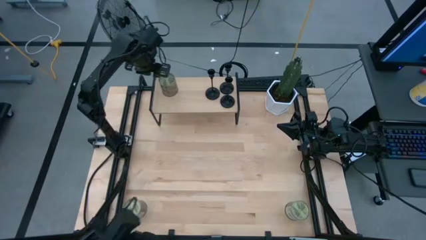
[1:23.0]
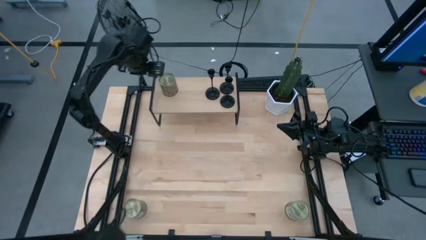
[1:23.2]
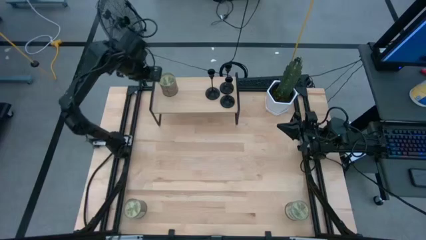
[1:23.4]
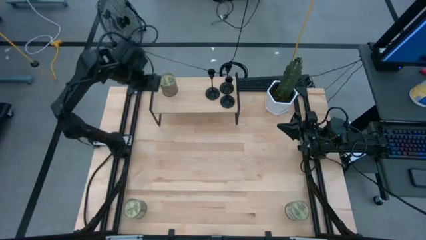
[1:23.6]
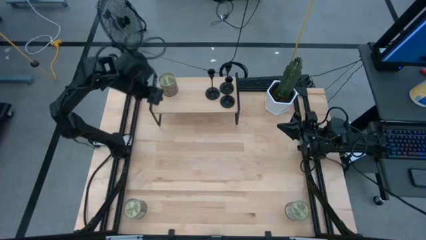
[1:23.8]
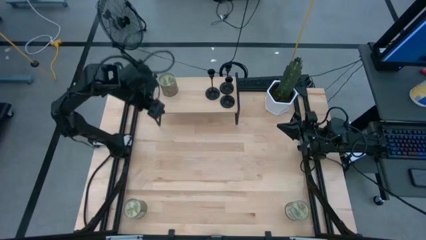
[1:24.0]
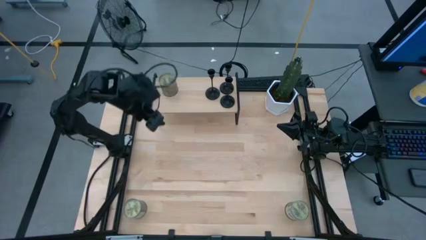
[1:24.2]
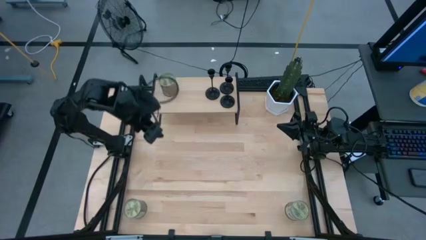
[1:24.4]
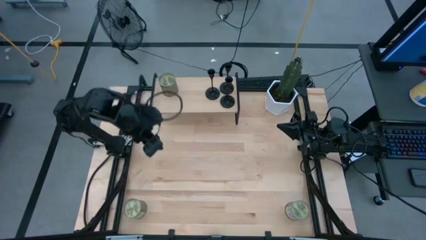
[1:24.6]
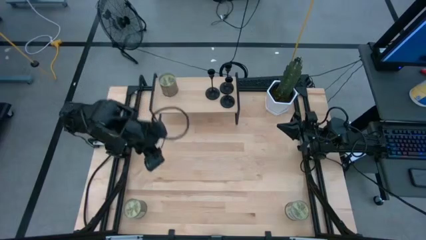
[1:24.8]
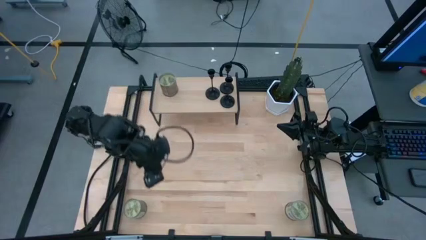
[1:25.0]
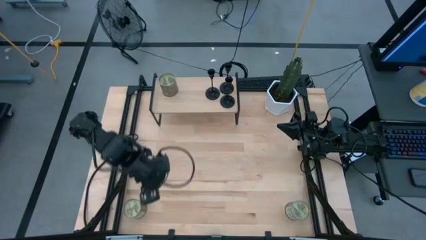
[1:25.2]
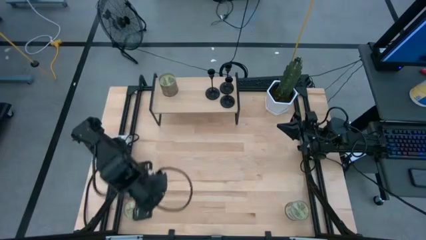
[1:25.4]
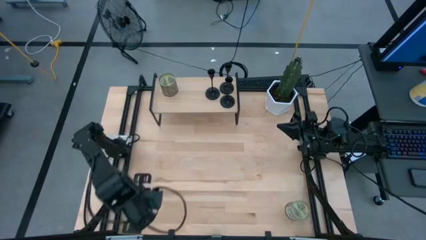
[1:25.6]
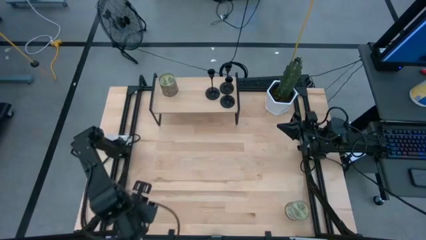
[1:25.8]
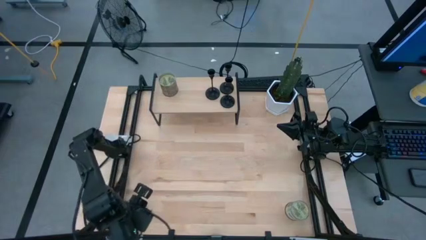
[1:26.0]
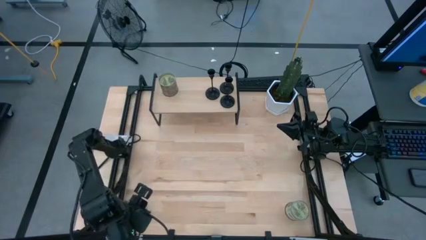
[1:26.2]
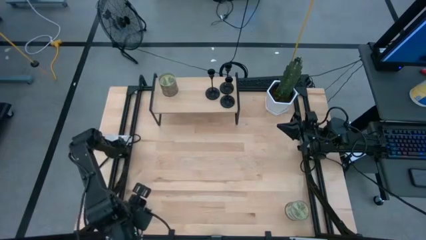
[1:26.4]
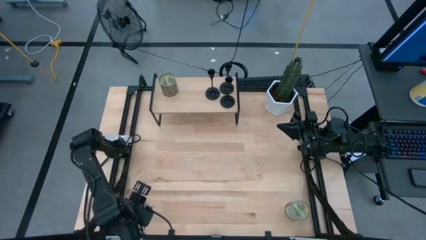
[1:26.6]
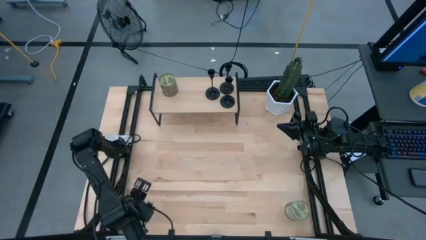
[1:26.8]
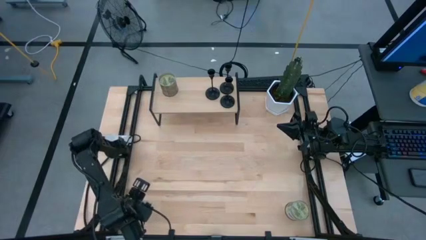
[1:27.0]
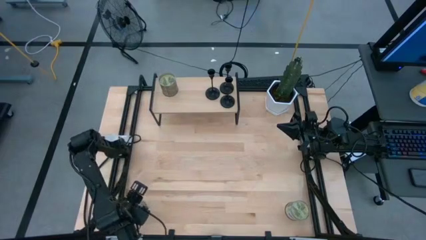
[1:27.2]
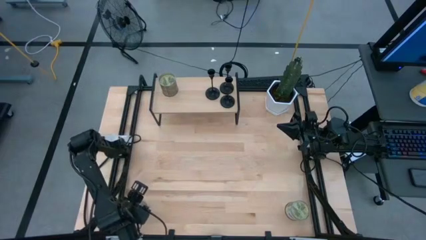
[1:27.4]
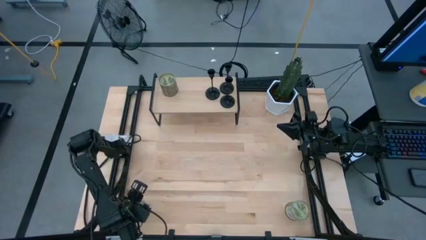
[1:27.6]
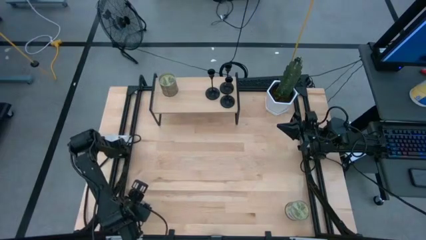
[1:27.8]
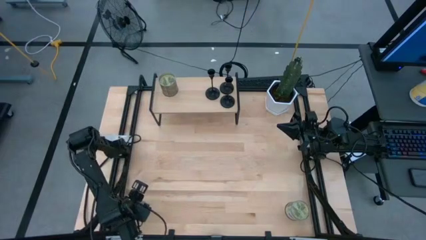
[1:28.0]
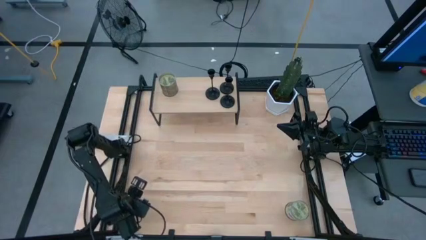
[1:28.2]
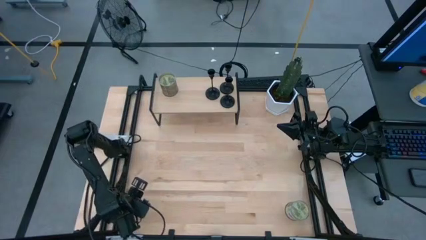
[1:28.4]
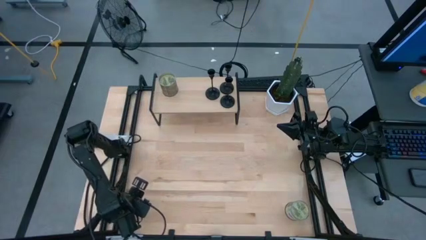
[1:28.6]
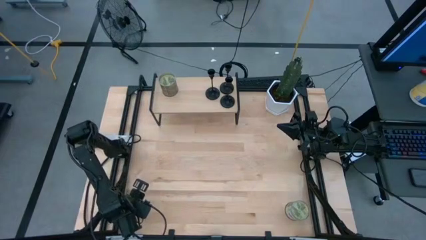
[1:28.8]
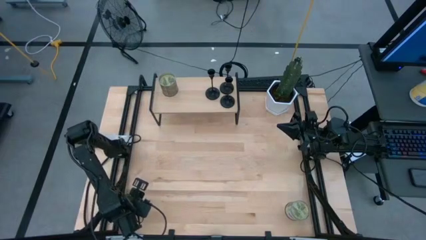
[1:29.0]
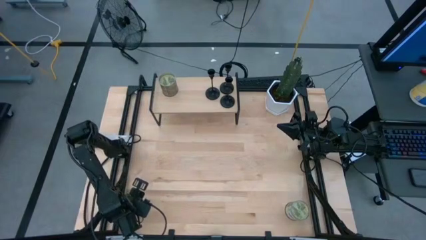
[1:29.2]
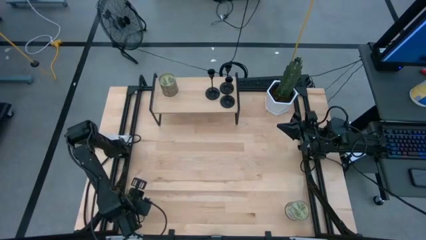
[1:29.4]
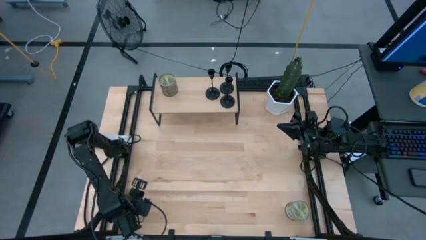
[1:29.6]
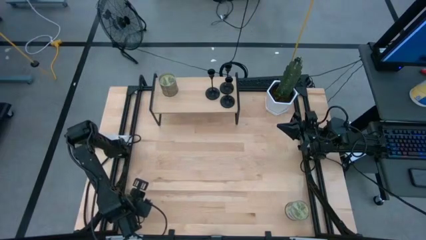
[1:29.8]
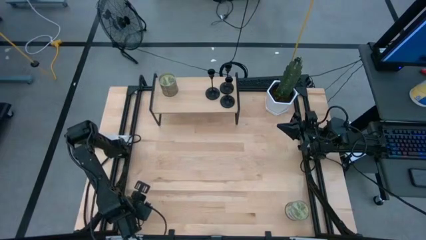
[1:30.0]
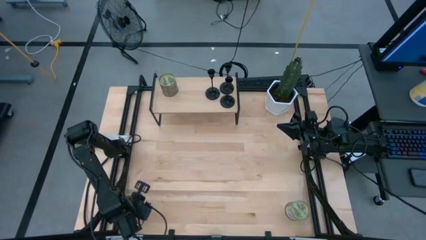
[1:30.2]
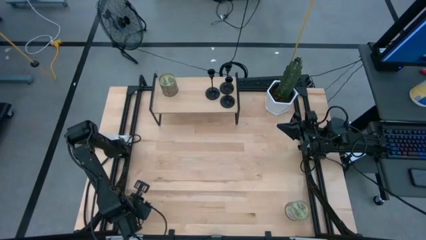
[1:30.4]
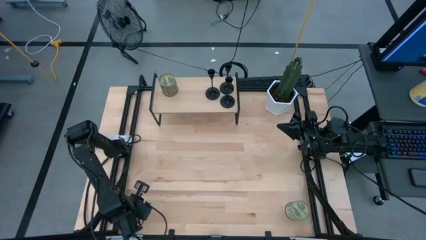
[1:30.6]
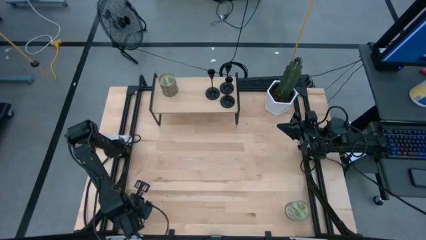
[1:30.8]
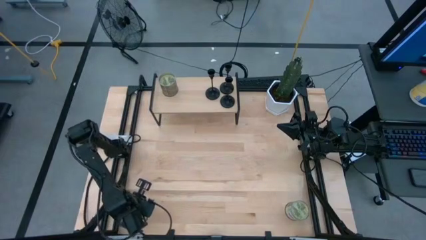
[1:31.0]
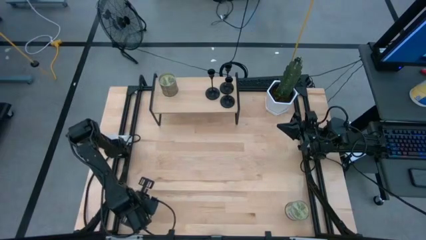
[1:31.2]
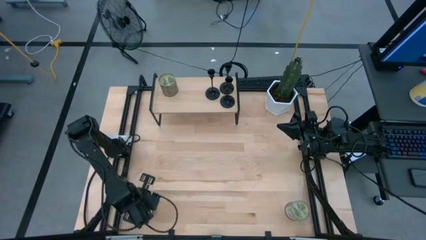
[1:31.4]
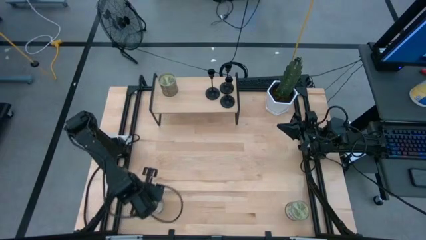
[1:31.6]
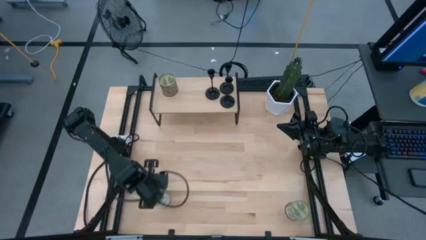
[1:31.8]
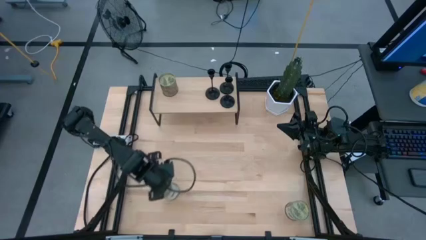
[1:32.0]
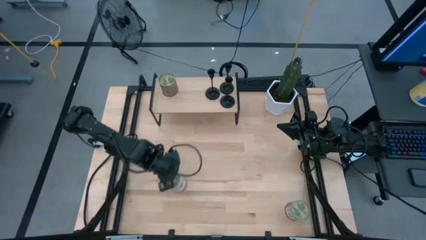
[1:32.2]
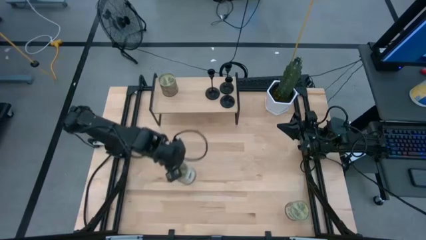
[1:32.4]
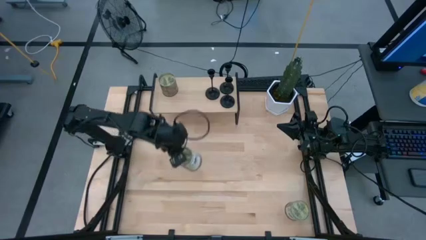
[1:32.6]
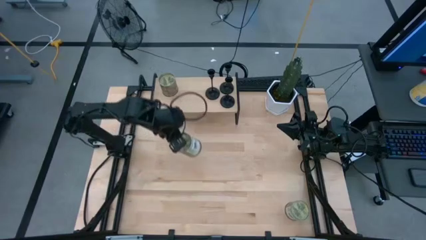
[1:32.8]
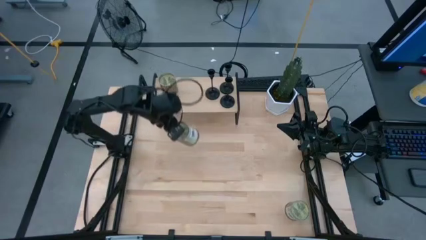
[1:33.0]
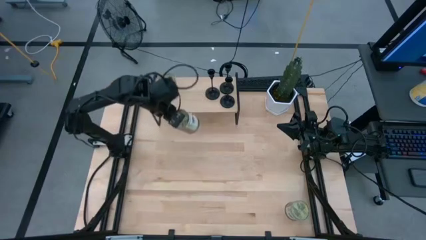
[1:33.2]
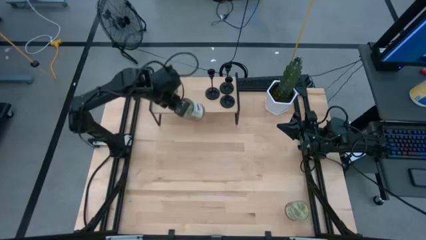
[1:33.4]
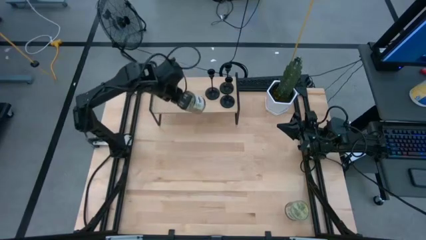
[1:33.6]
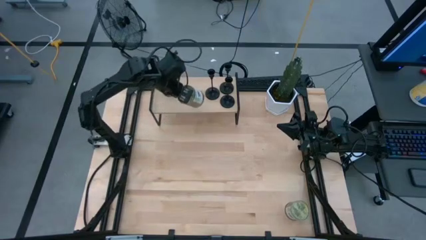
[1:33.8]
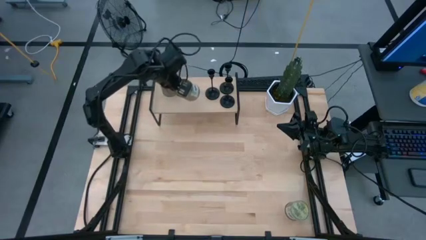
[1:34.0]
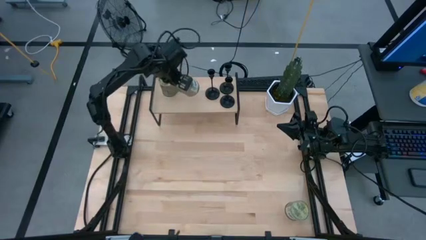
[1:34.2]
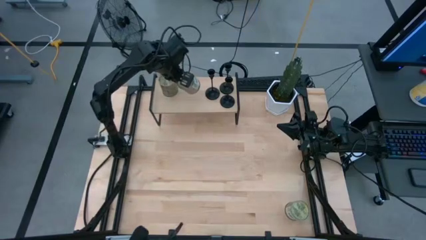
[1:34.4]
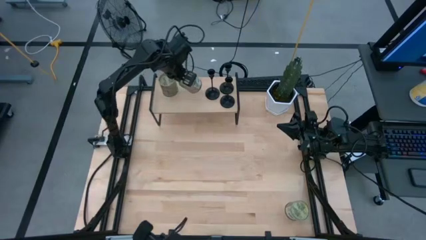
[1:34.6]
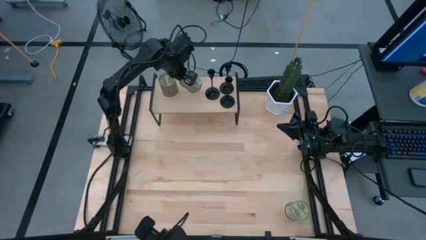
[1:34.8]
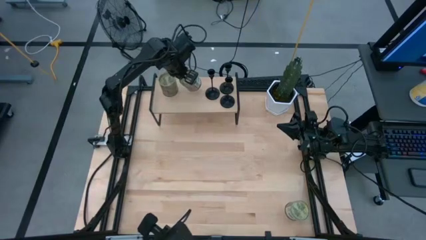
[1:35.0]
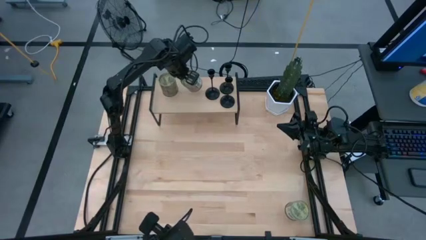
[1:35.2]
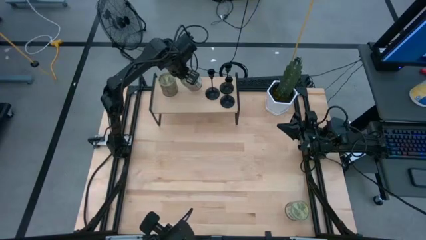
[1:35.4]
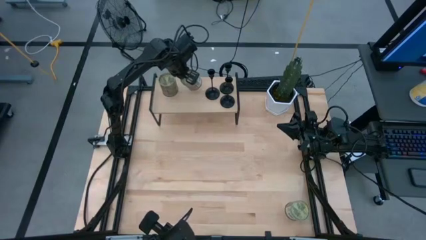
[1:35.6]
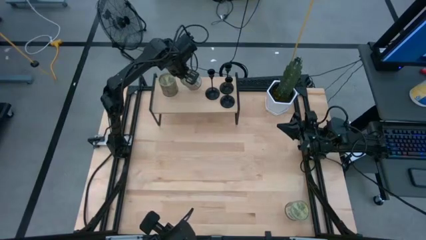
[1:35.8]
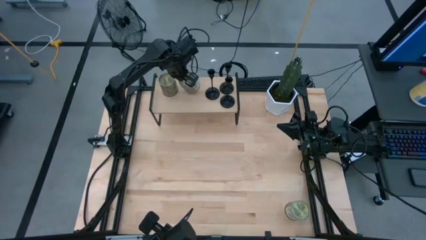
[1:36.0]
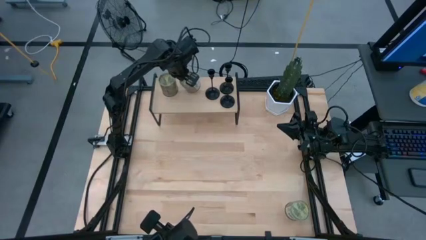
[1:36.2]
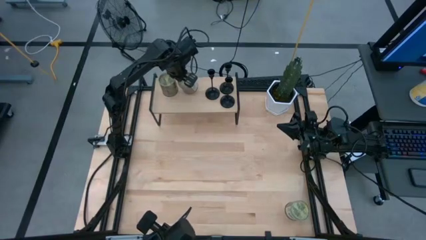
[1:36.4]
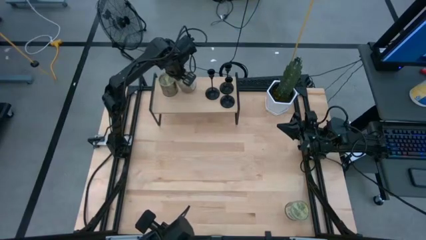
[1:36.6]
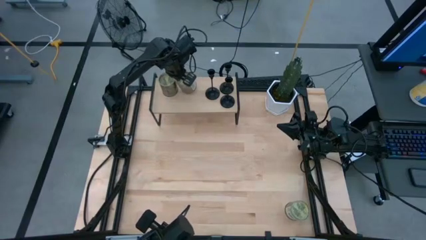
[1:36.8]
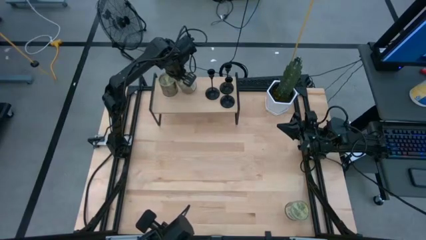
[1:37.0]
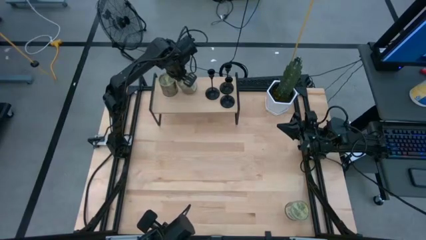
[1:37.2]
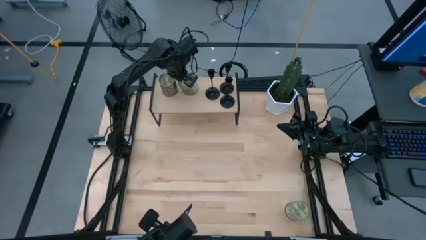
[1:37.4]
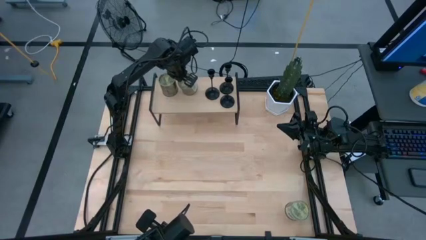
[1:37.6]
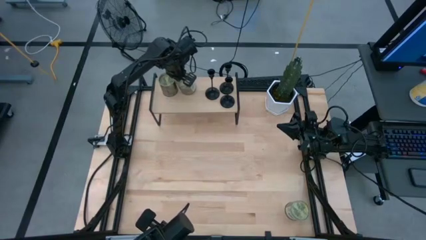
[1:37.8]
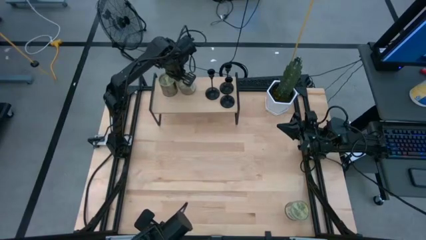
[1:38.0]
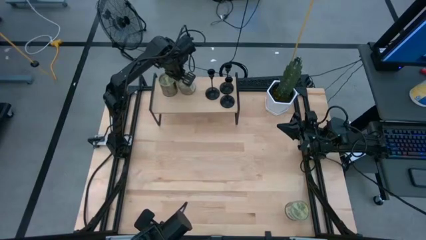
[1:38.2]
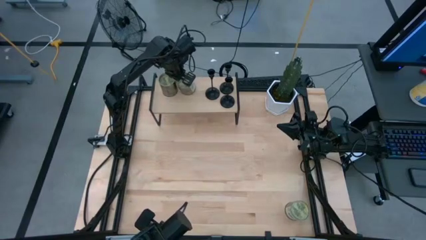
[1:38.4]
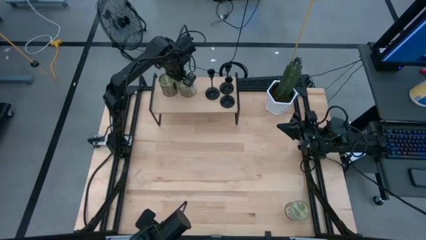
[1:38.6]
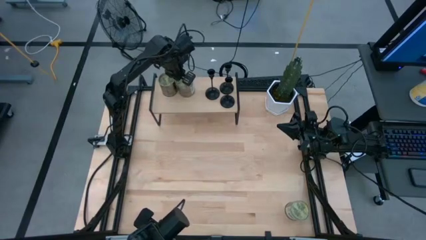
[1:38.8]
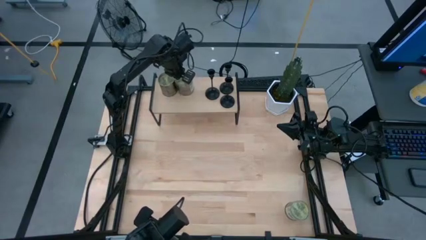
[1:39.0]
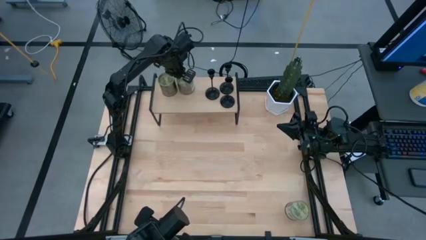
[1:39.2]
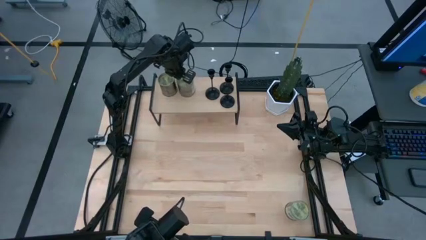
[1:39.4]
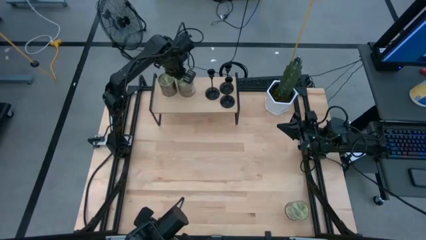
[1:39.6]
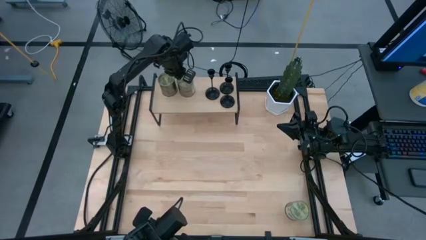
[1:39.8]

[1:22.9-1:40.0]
Task: Pick & Place candle stick holders
Align the left silver scented candle can with the other silver scented candle on the shelf
